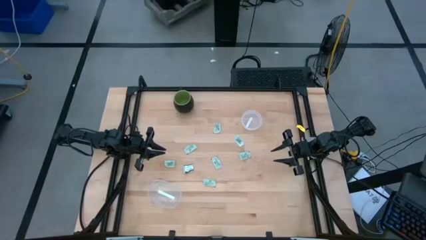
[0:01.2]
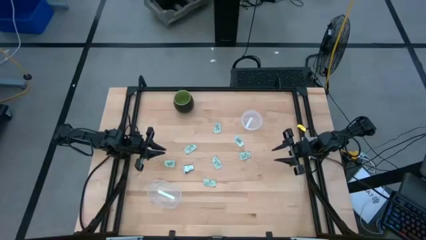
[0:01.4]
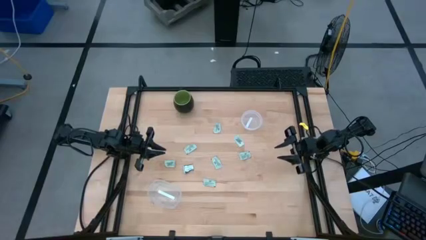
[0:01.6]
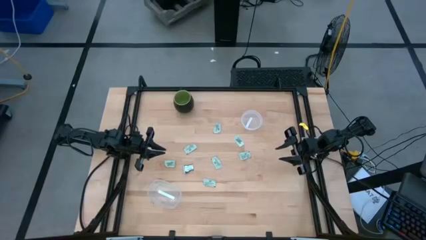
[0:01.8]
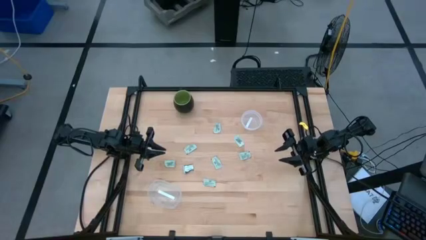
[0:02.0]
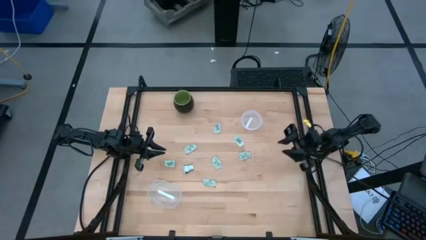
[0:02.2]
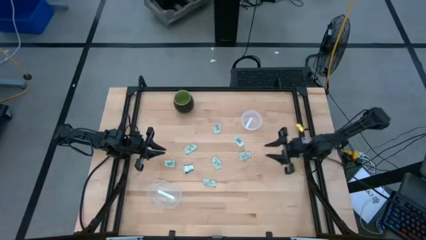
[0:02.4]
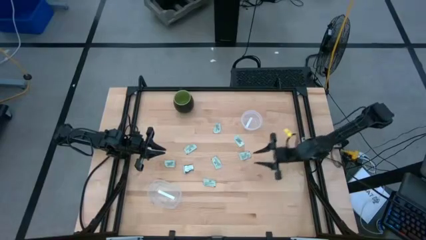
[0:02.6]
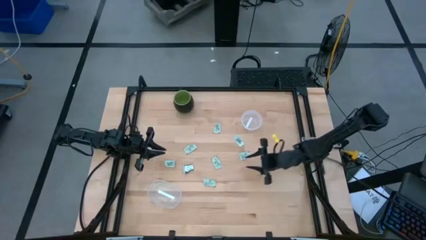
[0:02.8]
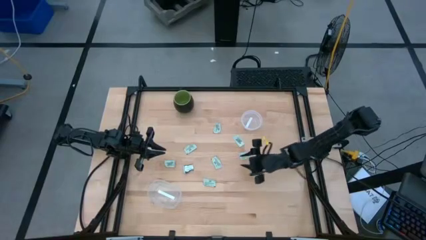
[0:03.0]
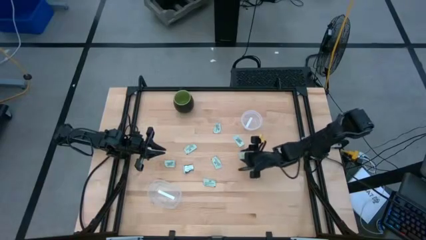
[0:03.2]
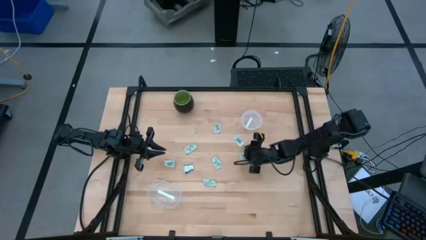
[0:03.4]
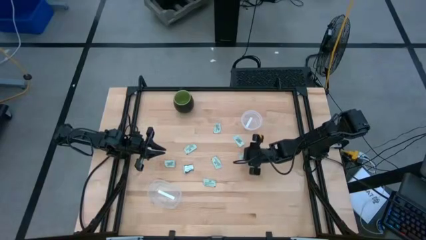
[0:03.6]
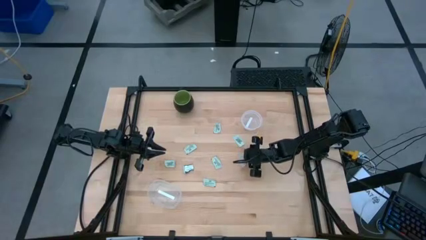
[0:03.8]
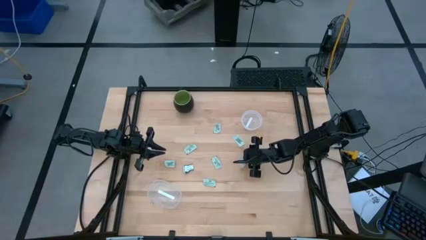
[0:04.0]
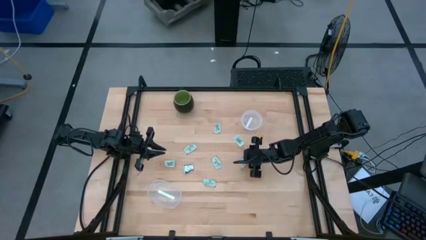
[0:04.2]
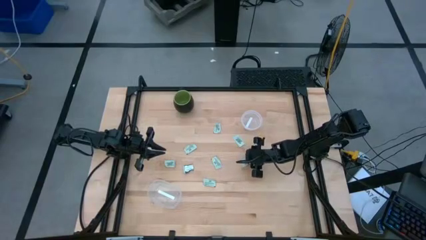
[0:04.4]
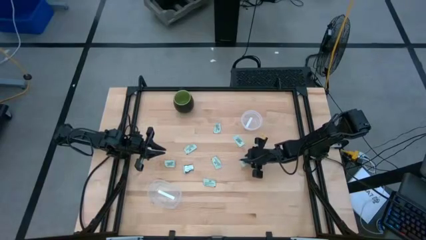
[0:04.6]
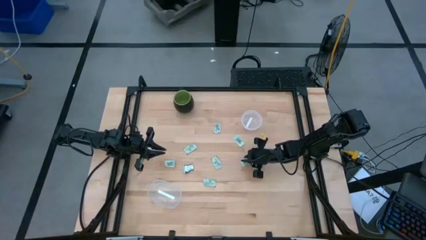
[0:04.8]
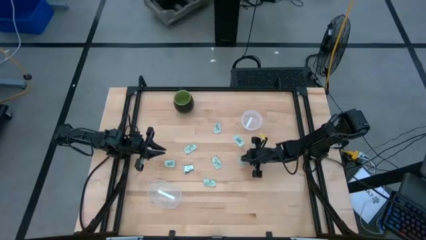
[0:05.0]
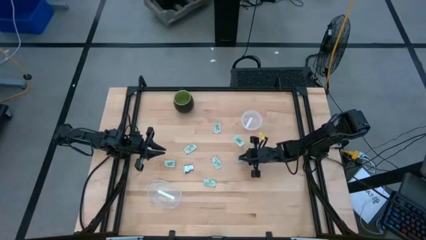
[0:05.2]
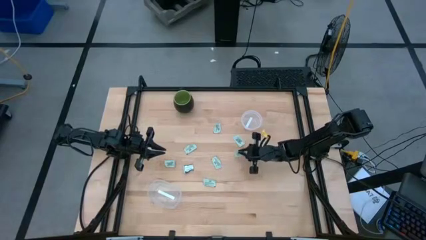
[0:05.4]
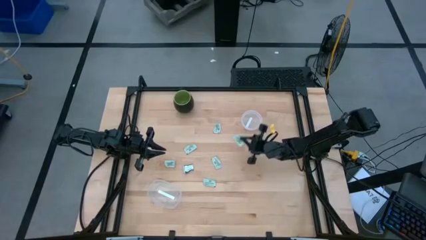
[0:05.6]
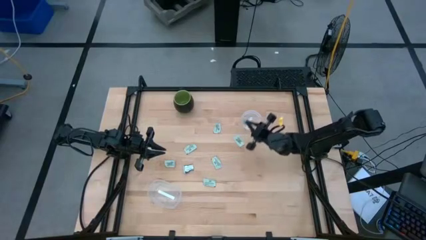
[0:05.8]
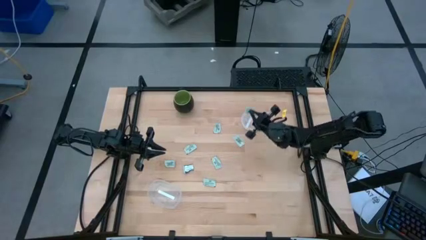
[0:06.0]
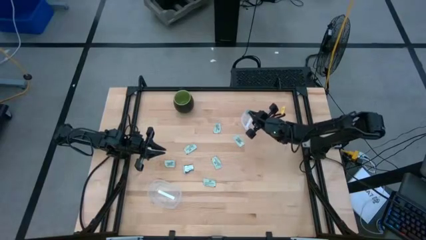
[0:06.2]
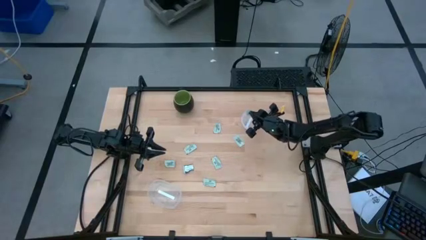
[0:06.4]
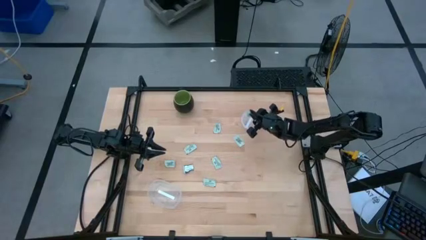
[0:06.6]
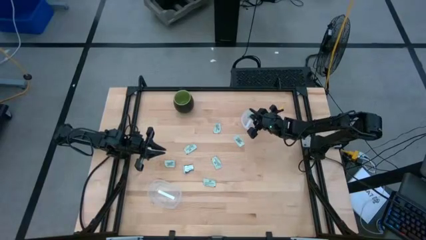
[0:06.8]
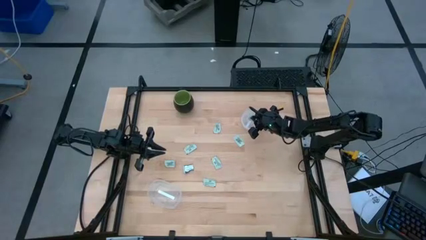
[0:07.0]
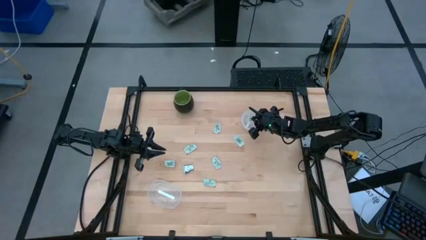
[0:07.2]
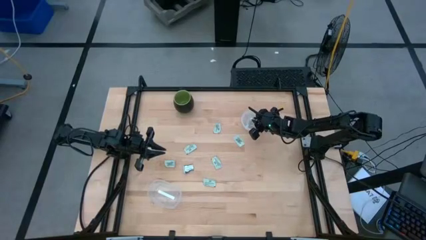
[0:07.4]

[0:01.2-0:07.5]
Task: Pick and place items into bin
Put the green stevia packet into the top transparent bin

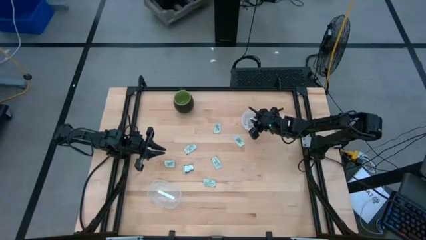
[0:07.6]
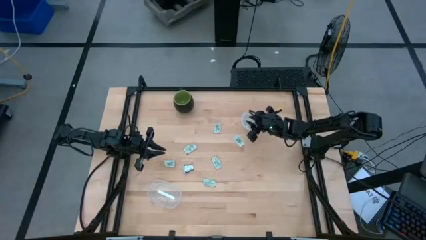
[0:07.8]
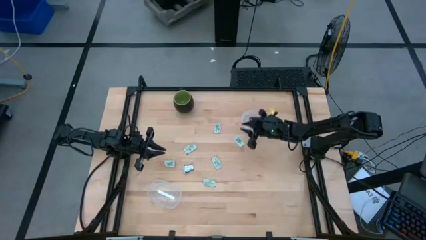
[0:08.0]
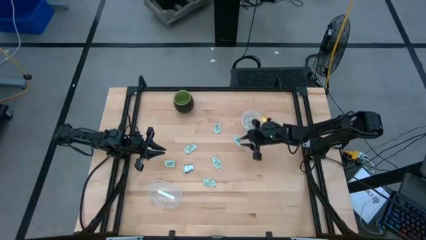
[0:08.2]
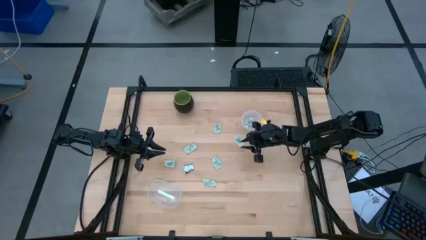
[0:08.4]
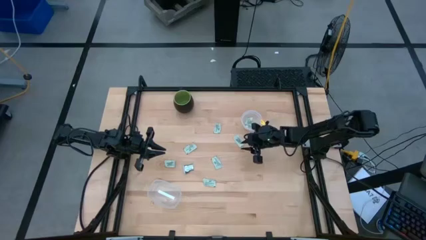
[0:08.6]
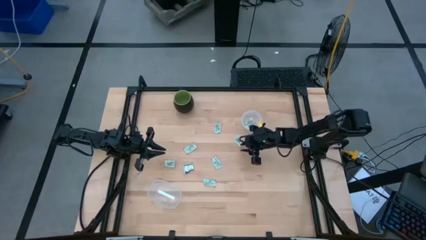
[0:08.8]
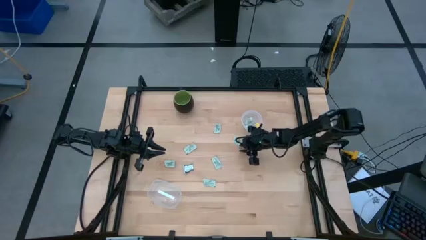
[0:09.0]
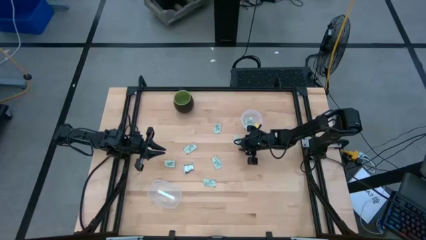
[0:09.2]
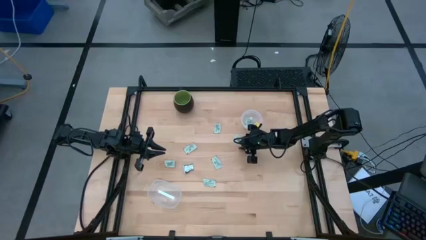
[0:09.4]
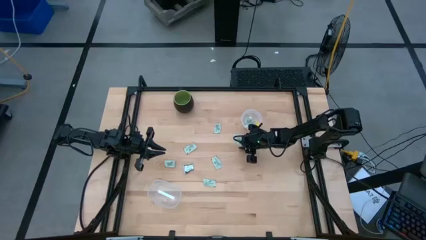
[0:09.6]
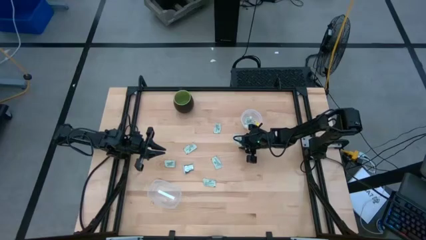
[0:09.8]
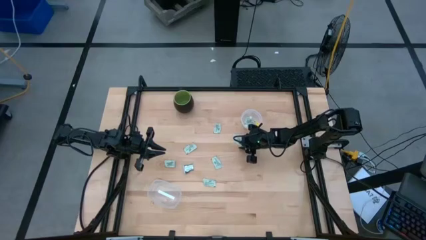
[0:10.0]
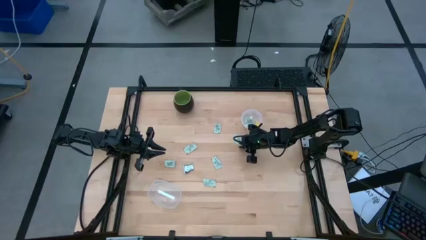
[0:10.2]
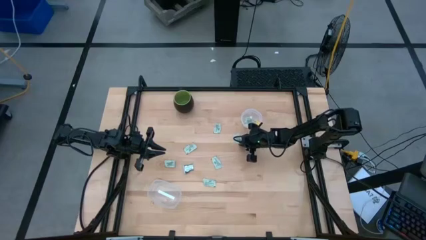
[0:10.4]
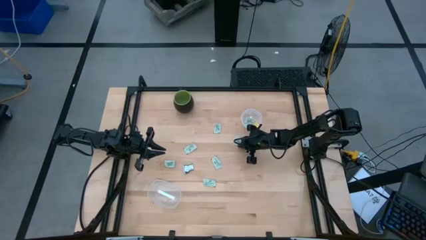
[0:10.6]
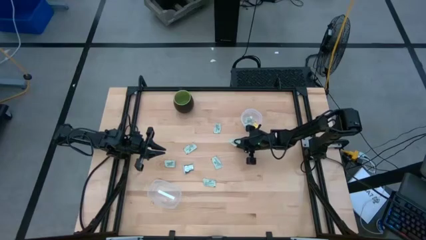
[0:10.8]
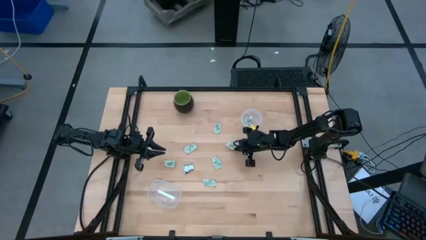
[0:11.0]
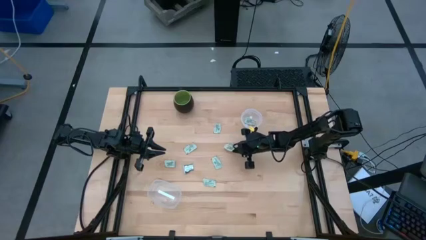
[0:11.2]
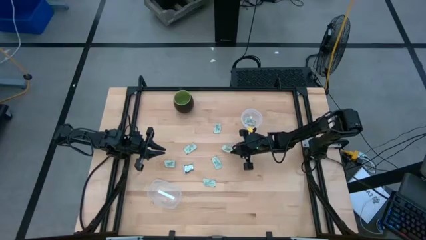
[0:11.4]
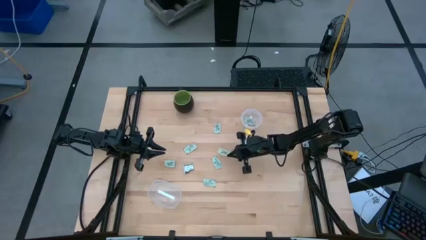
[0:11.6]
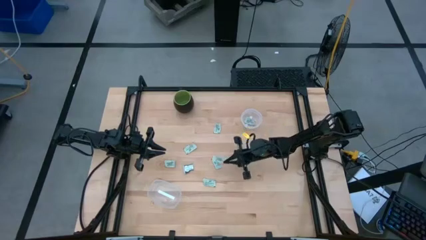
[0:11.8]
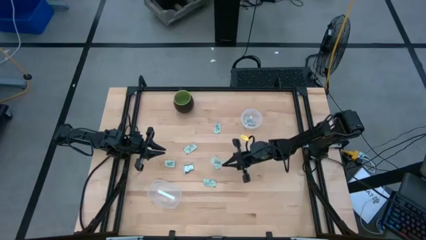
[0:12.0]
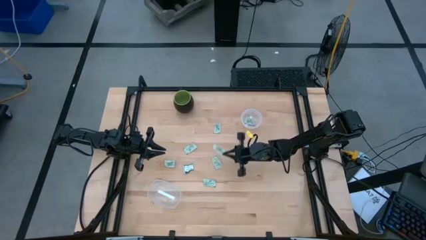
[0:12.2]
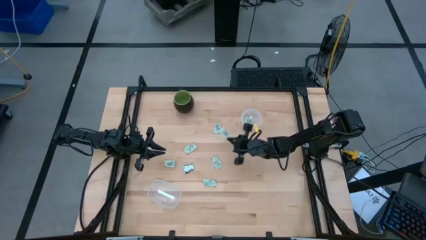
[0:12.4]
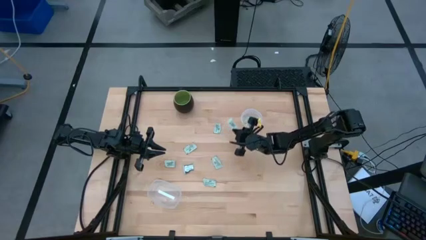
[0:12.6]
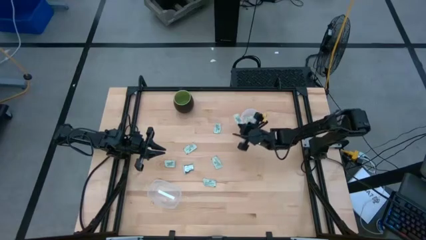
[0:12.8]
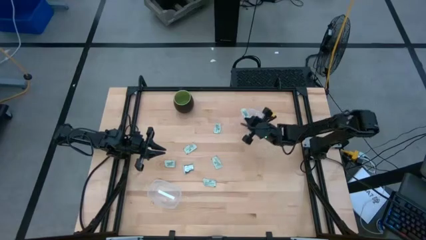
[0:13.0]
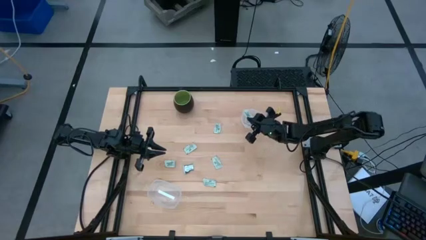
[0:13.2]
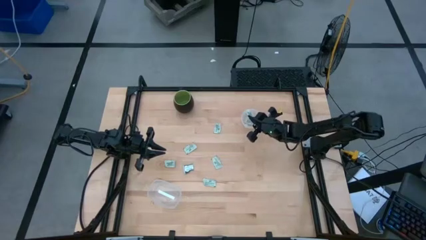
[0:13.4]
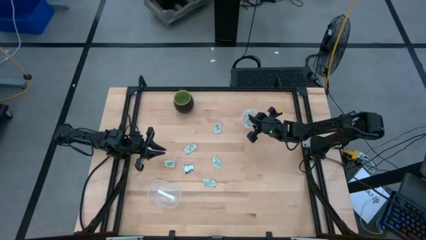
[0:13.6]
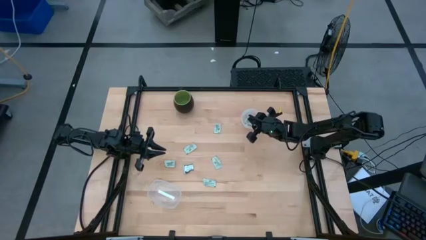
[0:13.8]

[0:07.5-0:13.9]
Put the green stevia packet into the top transparent bin

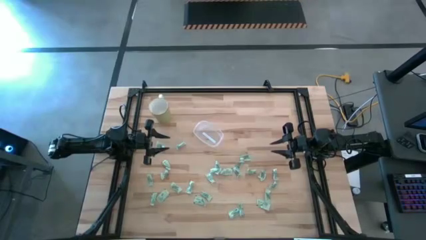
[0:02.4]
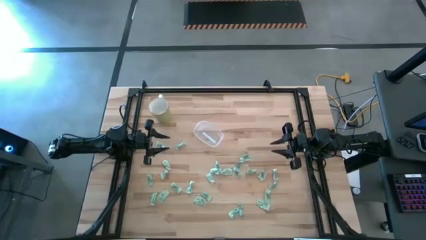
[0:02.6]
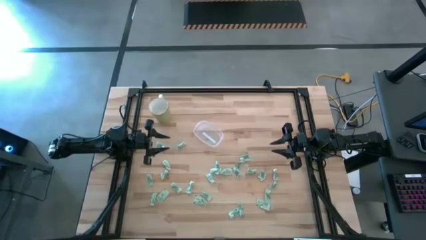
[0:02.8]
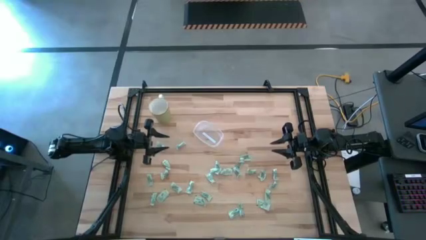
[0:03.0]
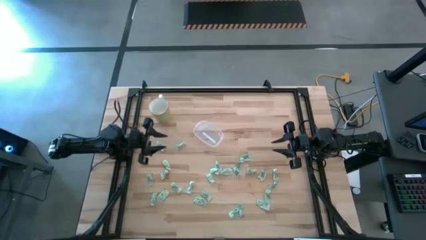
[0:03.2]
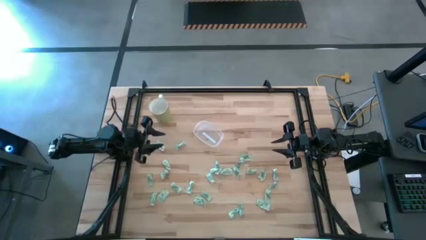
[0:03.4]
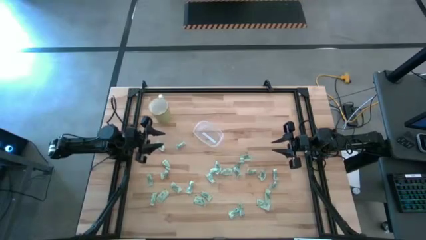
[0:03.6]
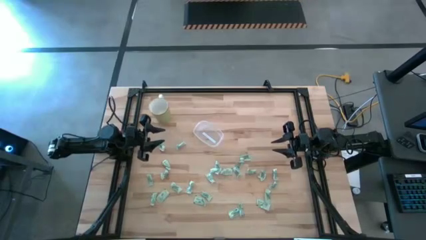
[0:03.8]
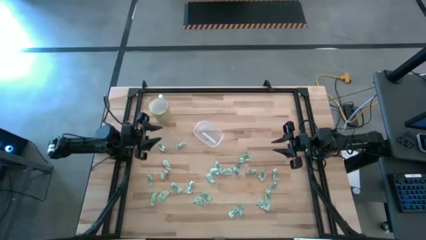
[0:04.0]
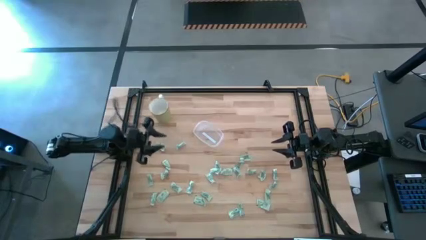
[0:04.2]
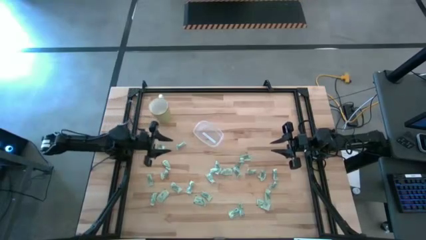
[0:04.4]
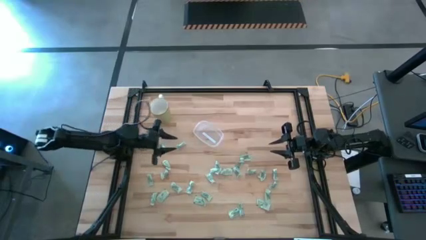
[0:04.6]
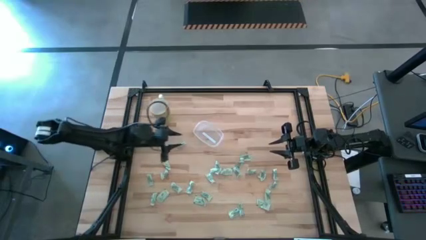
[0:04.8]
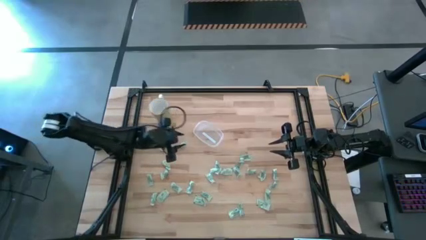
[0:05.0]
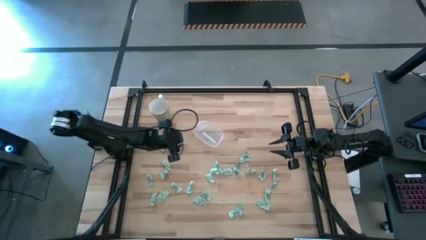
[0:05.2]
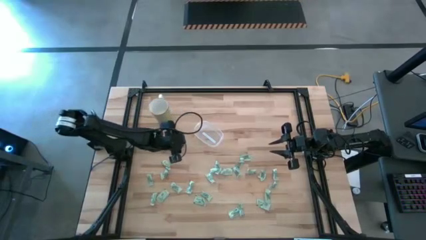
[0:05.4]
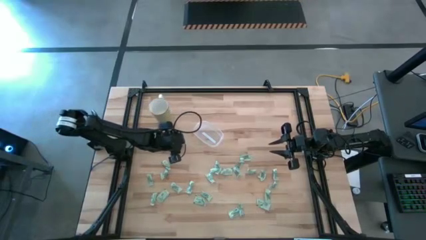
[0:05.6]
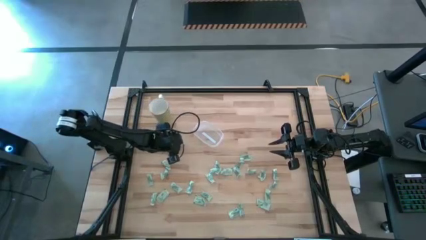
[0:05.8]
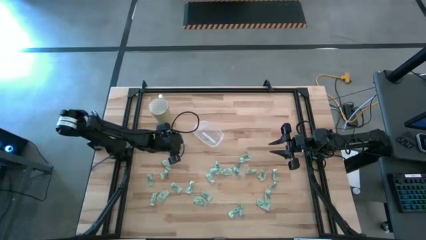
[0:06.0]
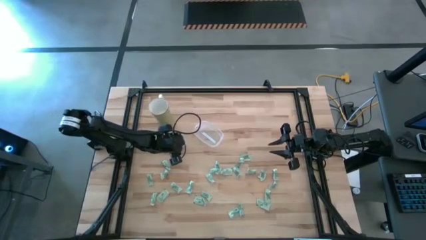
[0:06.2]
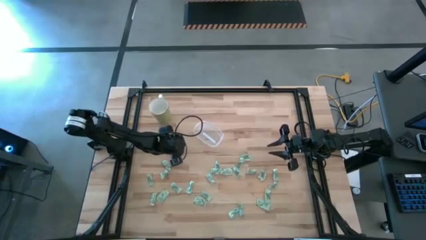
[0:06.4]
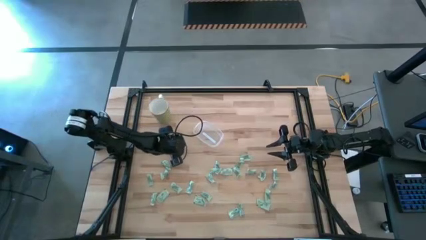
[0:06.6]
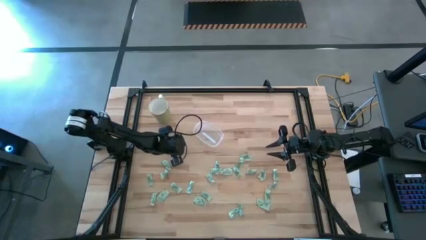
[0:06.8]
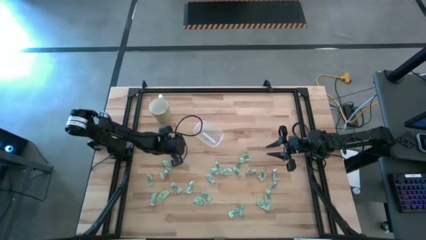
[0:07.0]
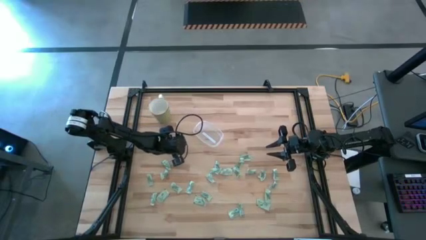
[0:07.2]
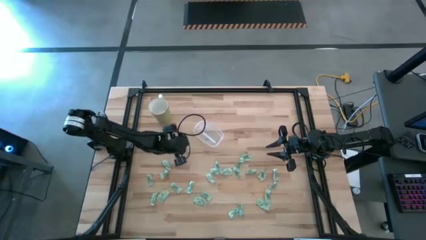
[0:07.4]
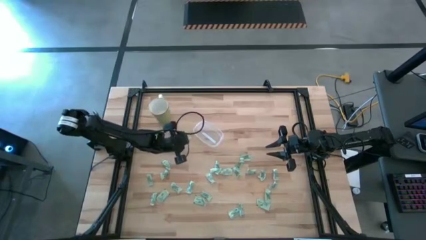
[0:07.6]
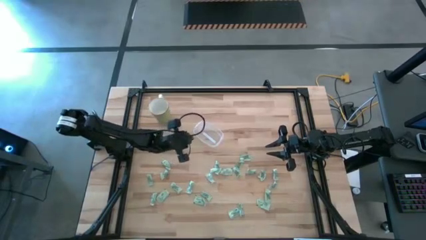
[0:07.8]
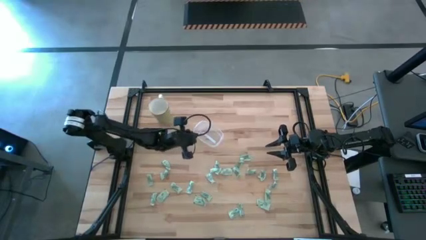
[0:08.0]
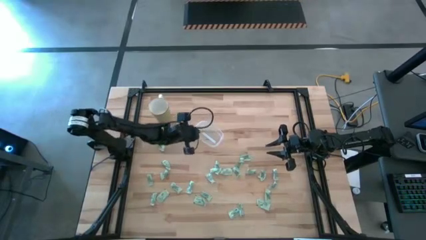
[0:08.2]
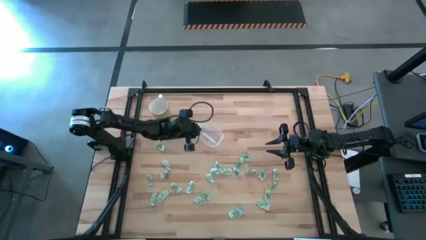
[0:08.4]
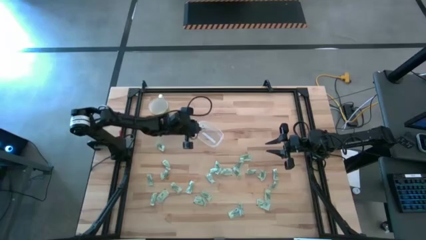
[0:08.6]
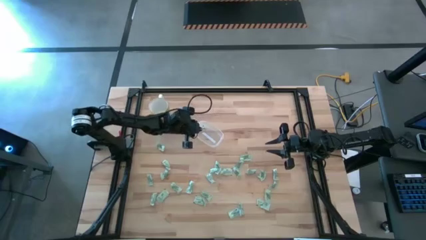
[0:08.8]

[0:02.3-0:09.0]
Task: Pick and place Stevia / Truvia into bins
Put the stevia packet into the transparent container
